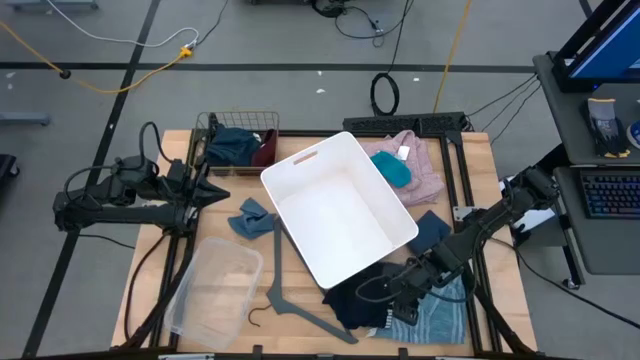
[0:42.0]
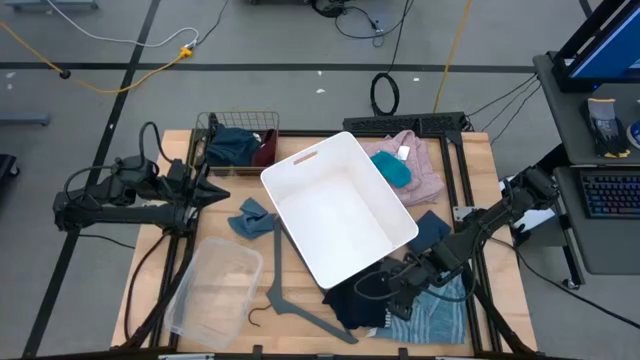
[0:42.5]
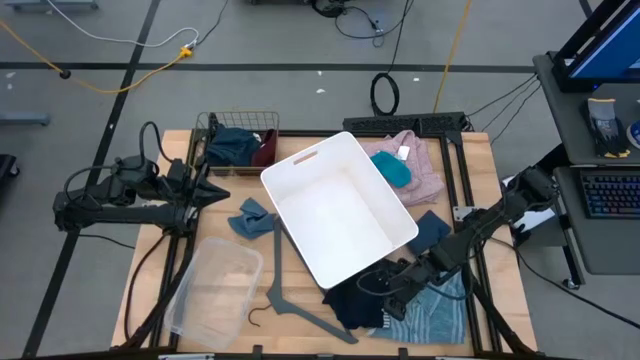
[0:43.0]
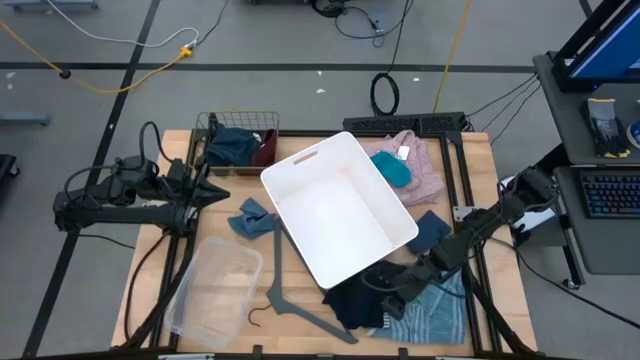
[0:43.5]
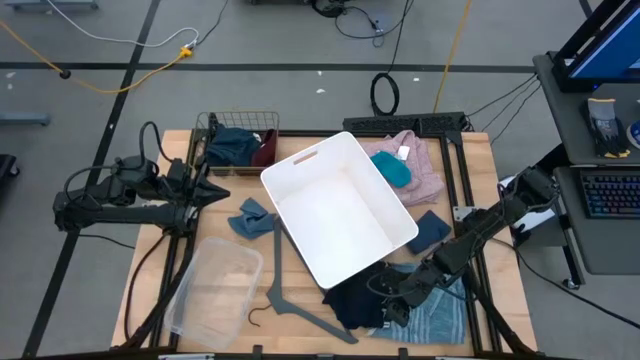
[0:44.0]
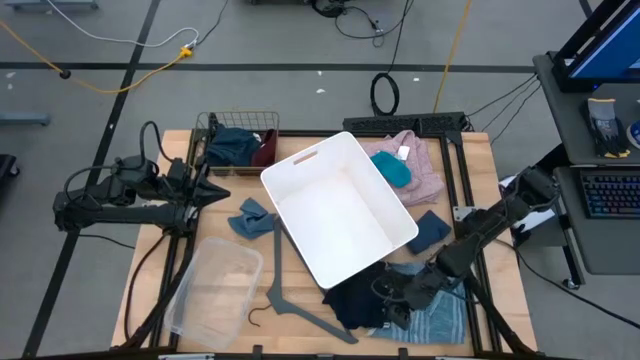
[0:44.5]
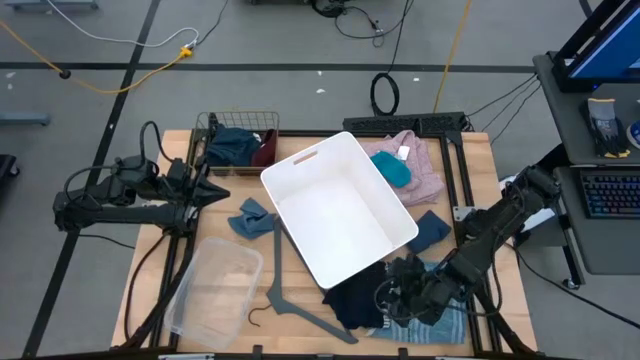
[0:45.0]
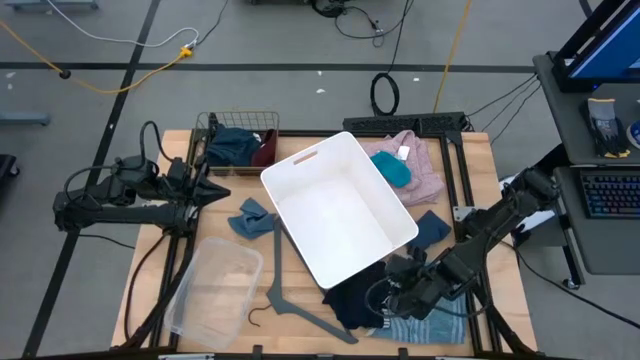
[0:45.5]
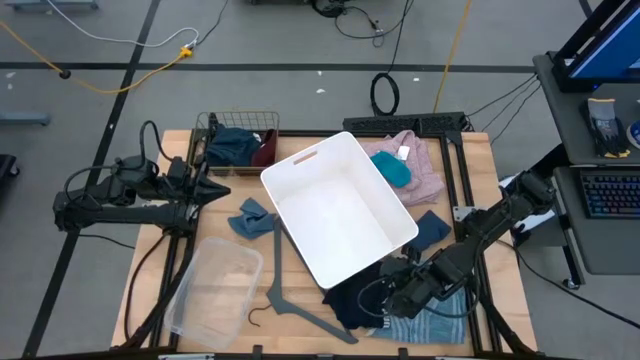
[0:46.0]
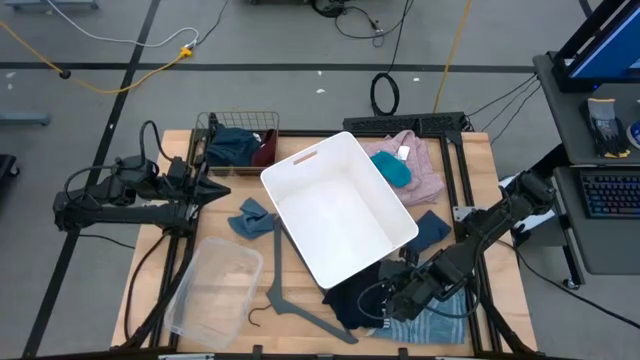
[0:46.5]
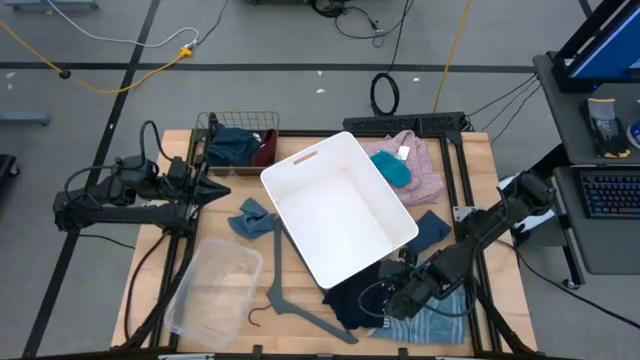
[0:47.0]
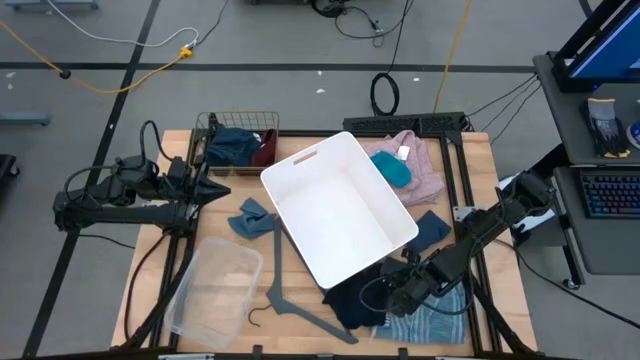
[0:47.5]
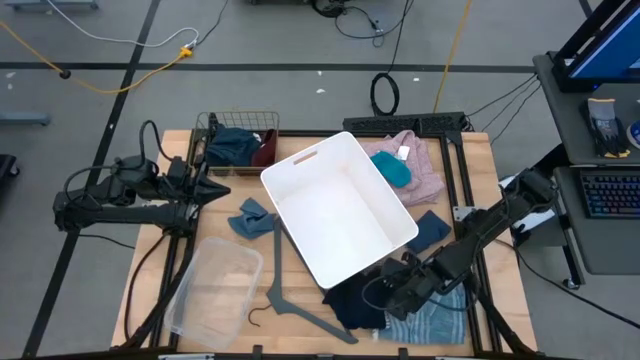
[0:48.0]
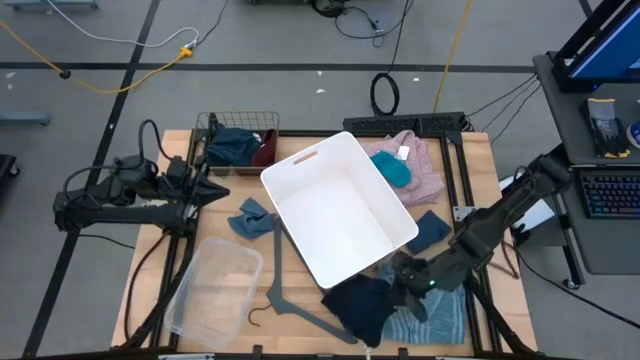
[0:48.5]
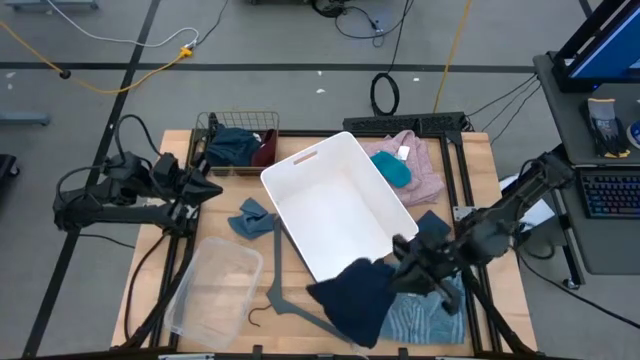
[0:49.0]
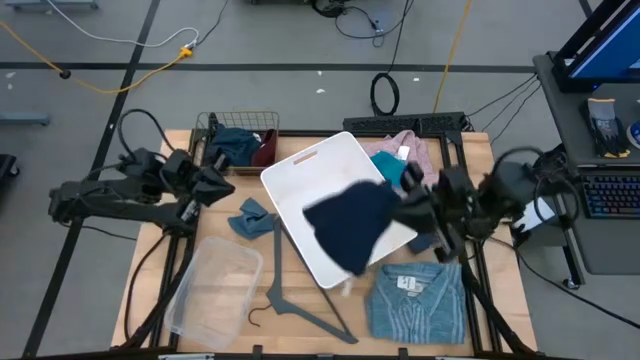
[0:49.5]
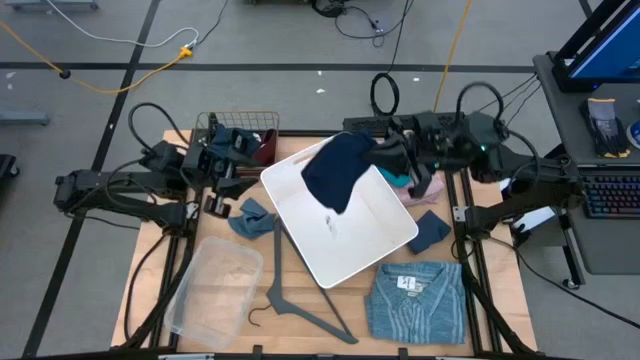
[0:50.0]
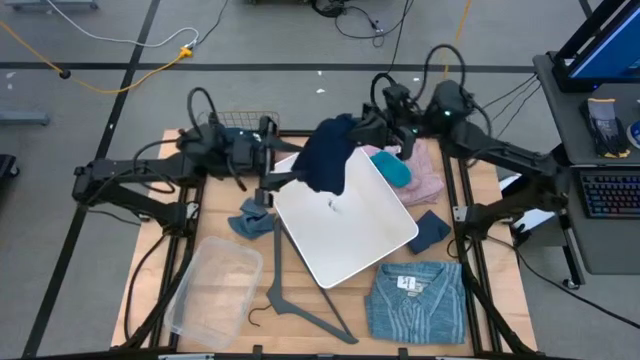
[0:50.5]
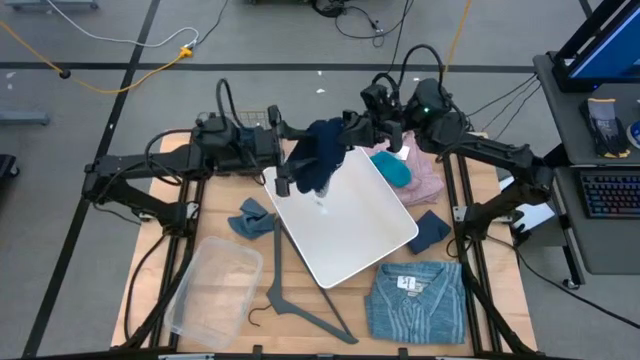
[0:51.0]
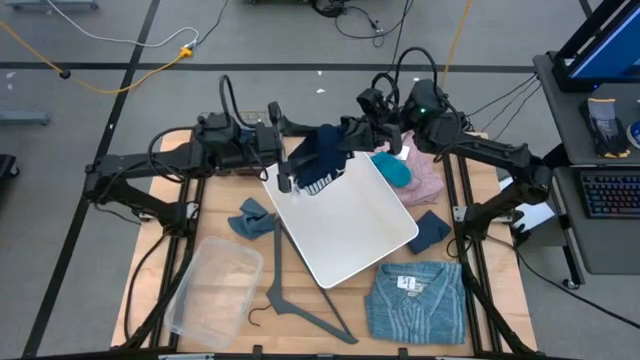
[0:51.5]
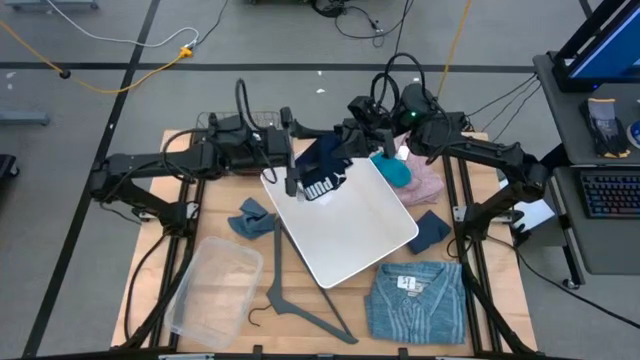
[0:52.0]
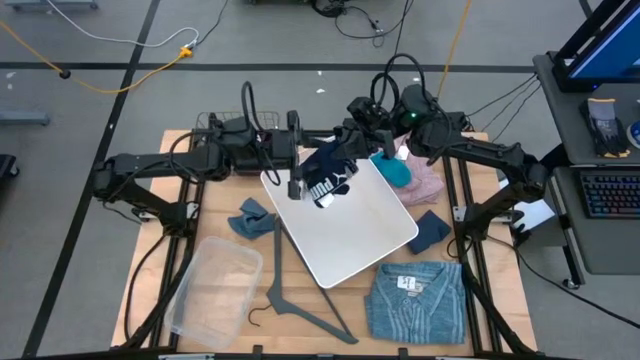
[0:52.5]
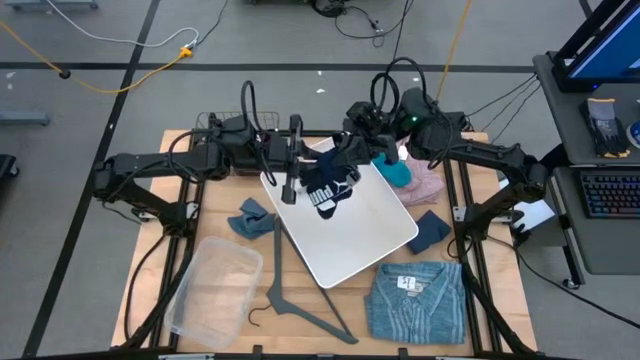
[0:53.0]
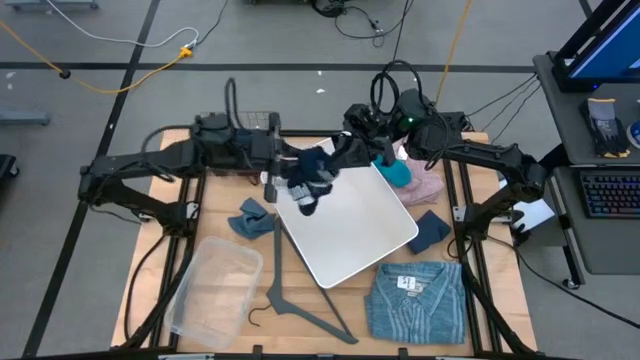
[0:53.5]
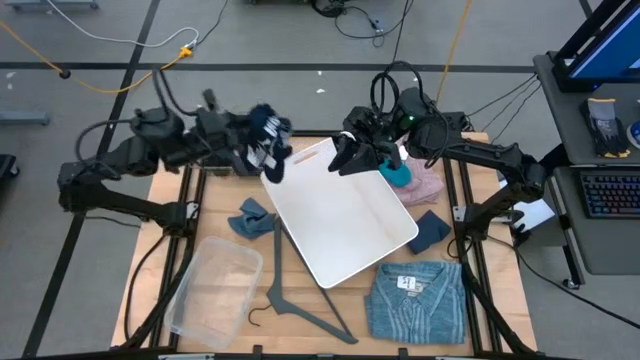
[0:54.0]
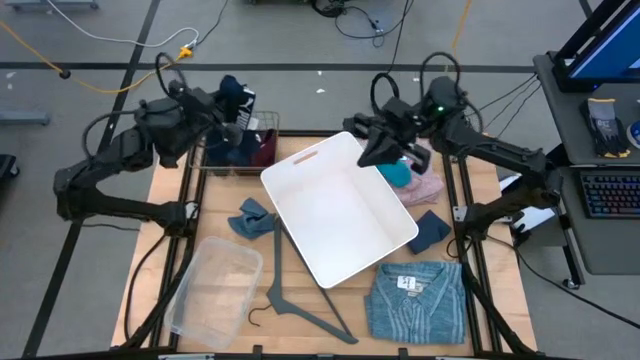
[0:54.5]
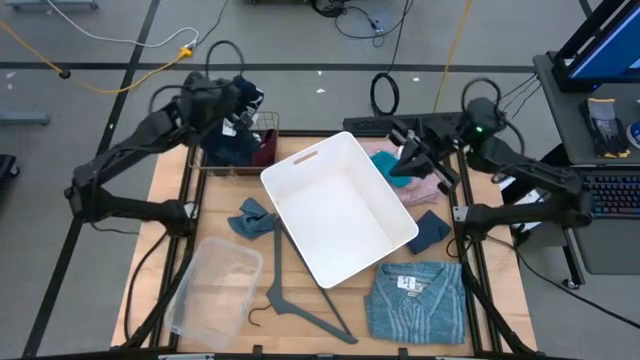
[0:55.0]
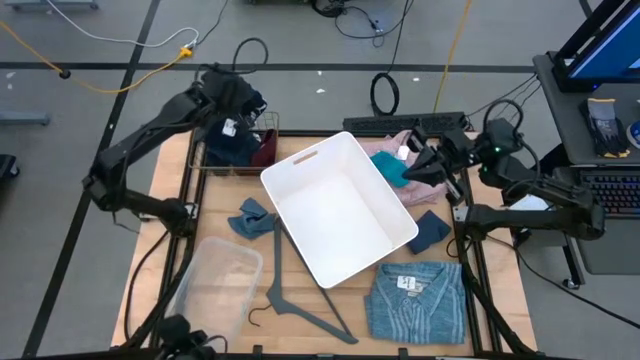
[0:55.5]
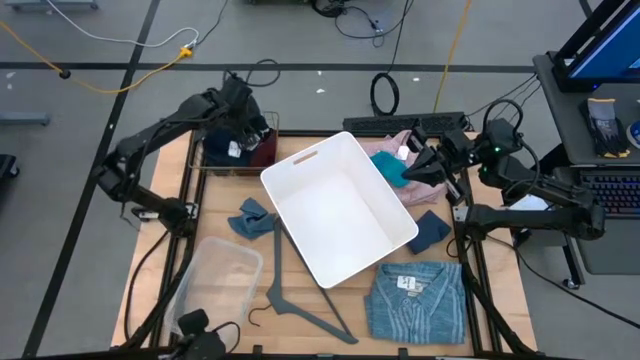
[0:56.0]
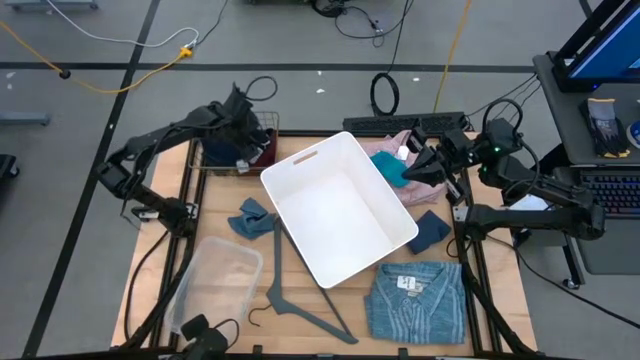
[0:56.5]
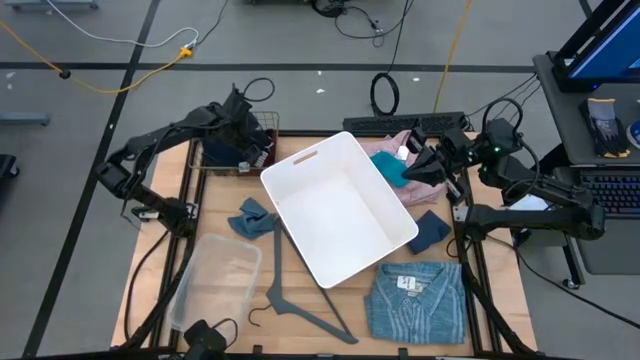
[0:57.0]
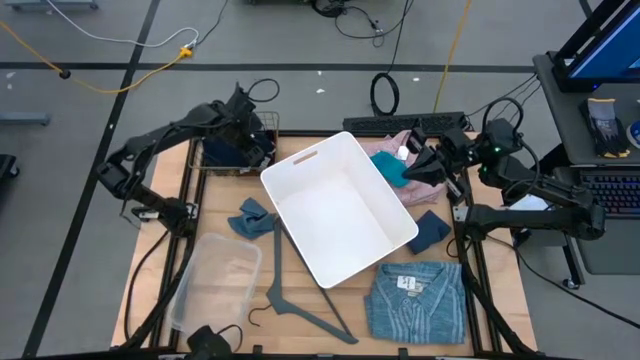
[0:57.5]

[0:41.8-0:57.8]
Task: Pick & Place Cloths
Put the blue boxer shorts into the mesh basket
